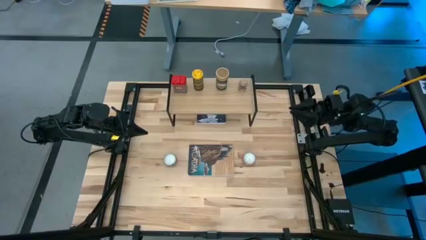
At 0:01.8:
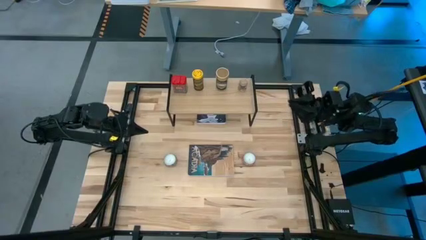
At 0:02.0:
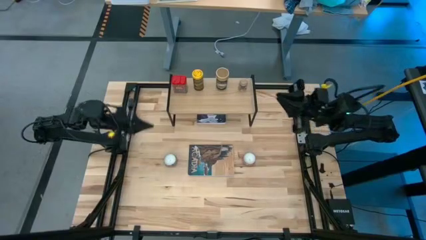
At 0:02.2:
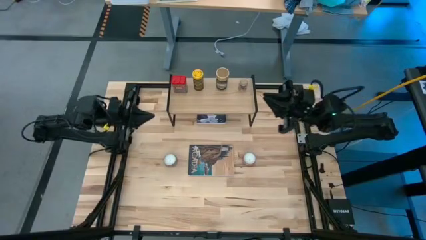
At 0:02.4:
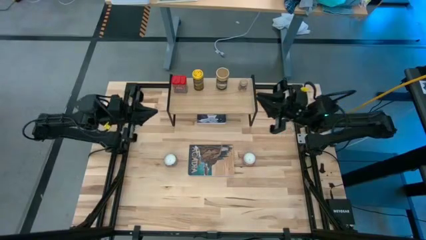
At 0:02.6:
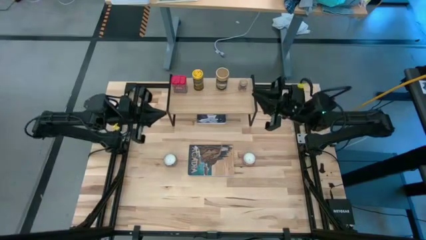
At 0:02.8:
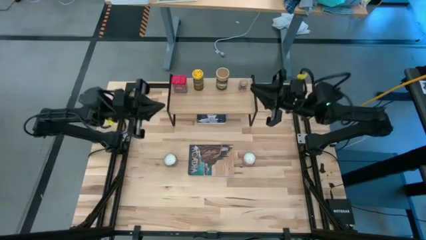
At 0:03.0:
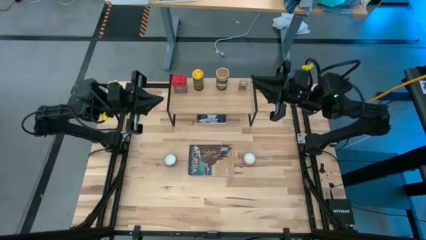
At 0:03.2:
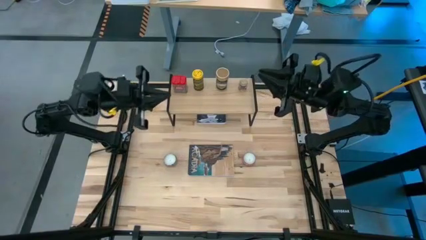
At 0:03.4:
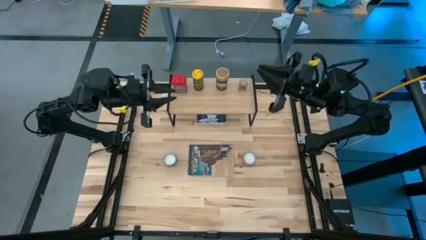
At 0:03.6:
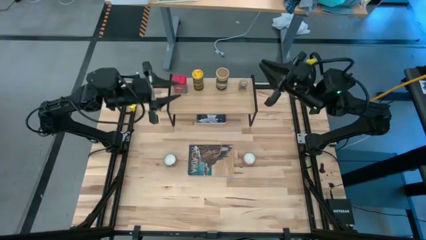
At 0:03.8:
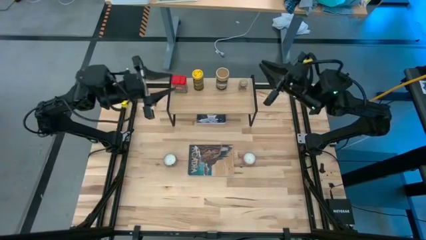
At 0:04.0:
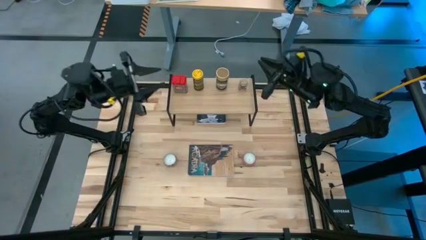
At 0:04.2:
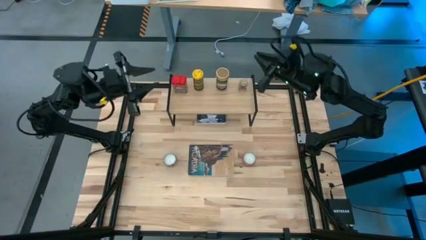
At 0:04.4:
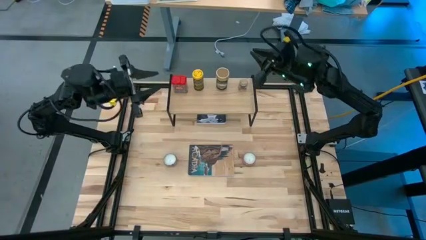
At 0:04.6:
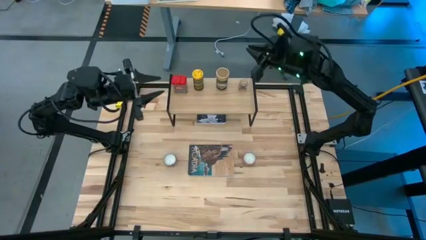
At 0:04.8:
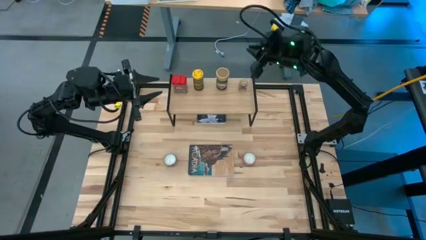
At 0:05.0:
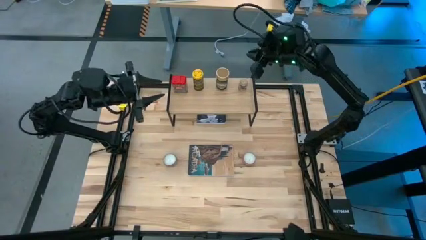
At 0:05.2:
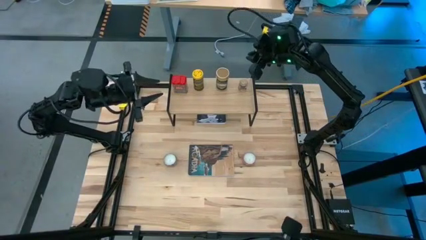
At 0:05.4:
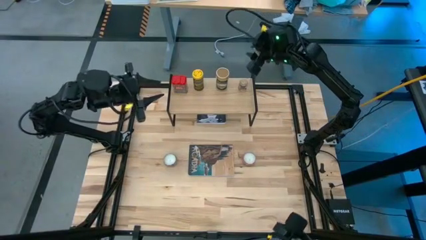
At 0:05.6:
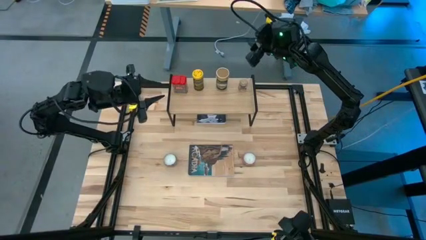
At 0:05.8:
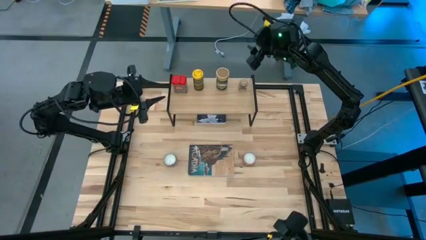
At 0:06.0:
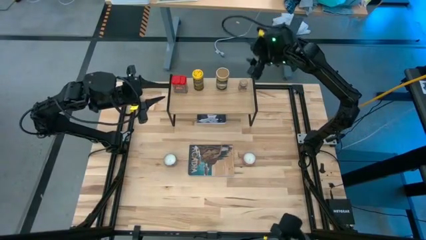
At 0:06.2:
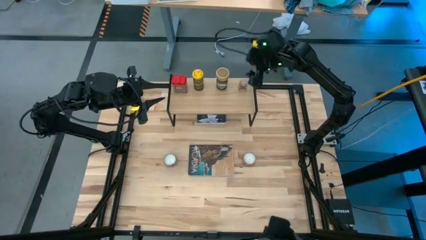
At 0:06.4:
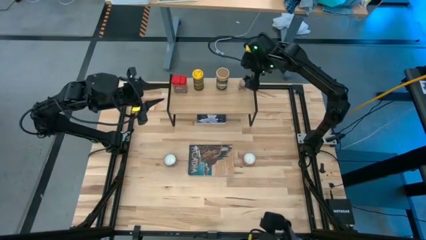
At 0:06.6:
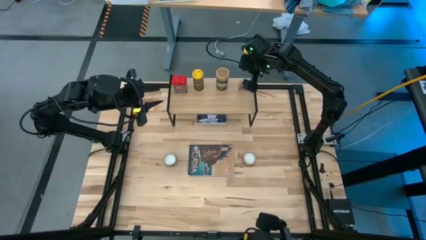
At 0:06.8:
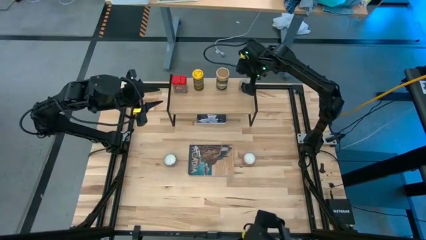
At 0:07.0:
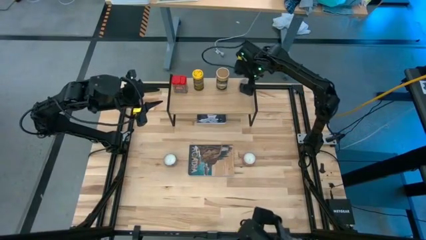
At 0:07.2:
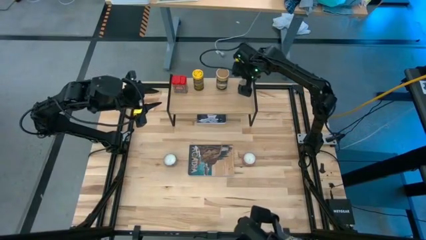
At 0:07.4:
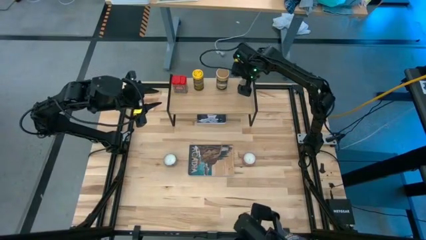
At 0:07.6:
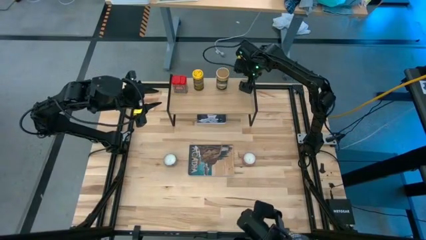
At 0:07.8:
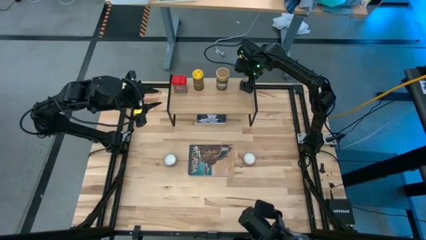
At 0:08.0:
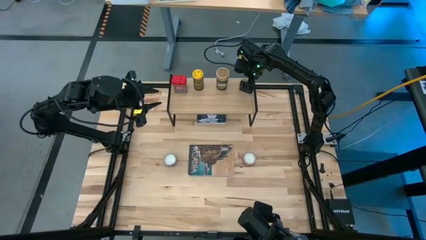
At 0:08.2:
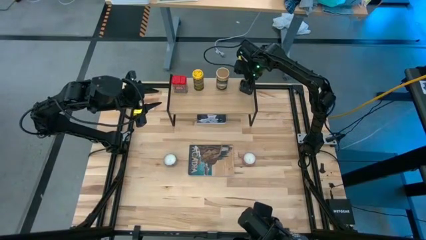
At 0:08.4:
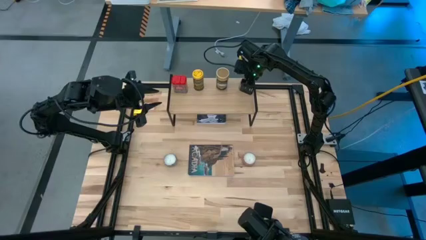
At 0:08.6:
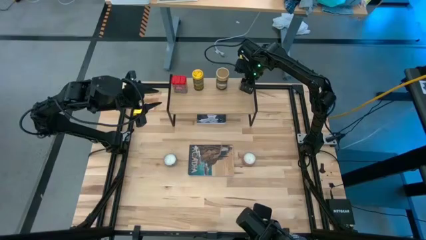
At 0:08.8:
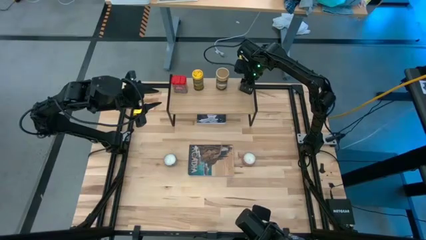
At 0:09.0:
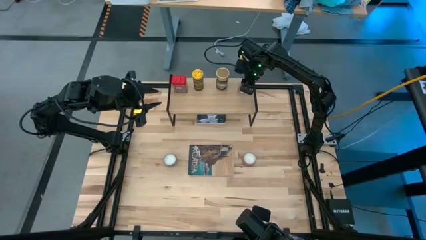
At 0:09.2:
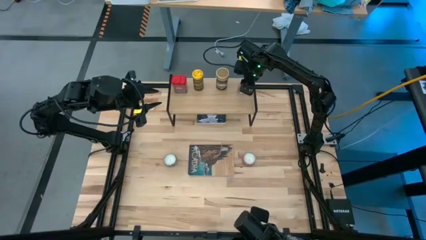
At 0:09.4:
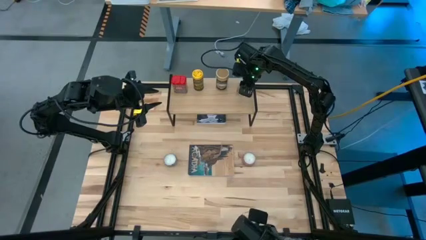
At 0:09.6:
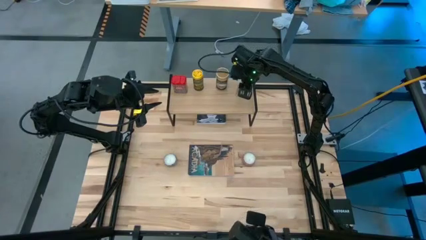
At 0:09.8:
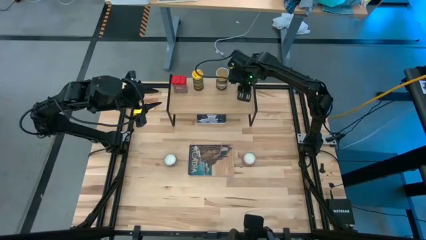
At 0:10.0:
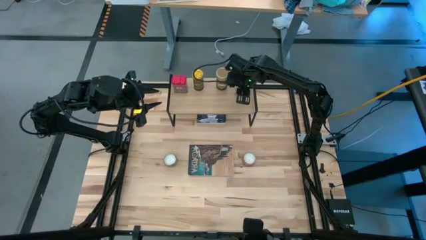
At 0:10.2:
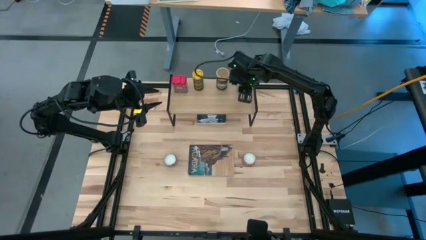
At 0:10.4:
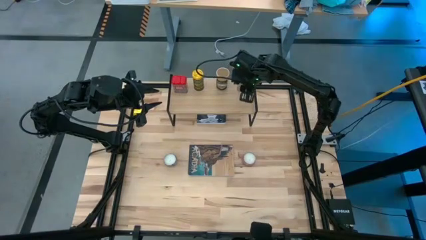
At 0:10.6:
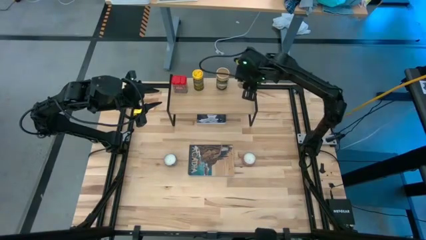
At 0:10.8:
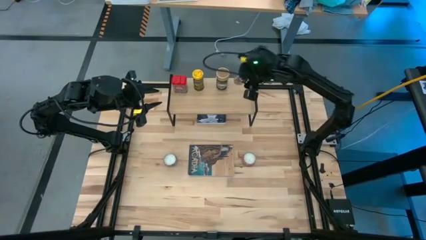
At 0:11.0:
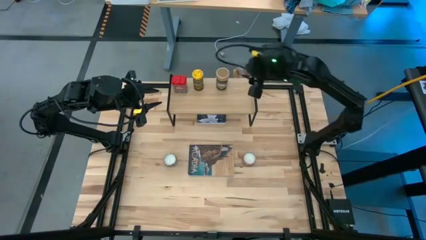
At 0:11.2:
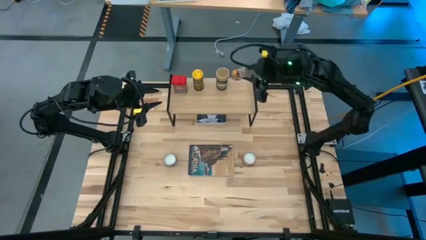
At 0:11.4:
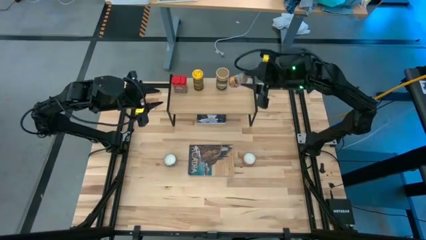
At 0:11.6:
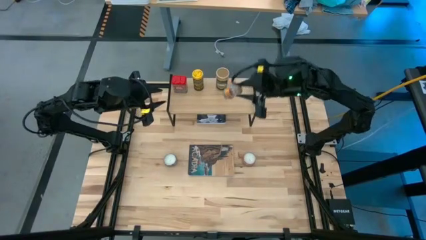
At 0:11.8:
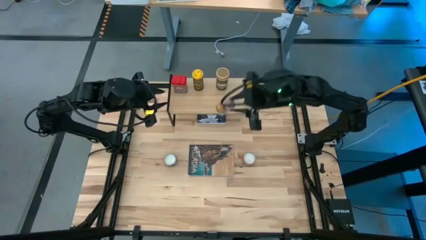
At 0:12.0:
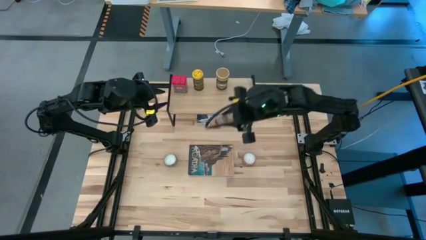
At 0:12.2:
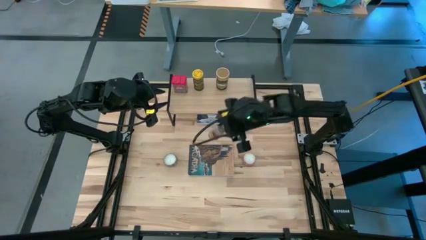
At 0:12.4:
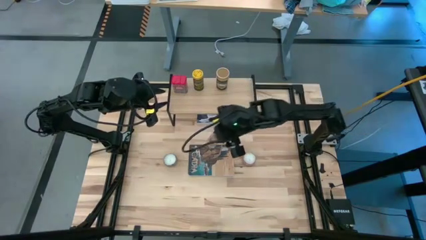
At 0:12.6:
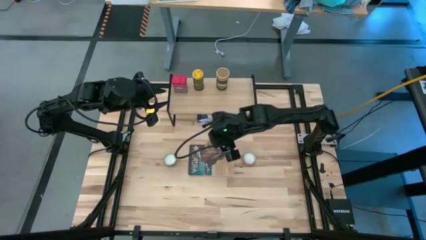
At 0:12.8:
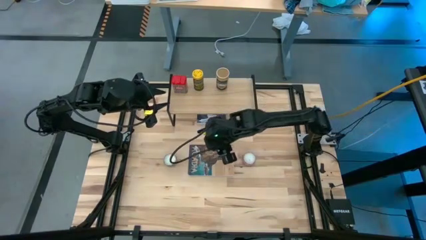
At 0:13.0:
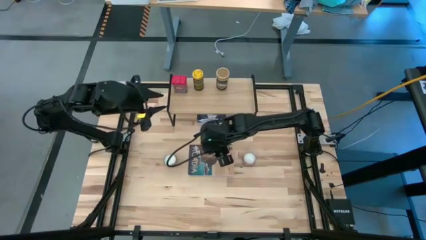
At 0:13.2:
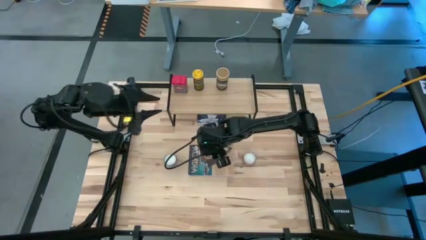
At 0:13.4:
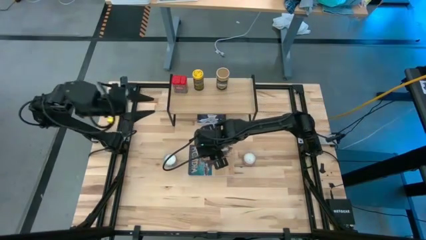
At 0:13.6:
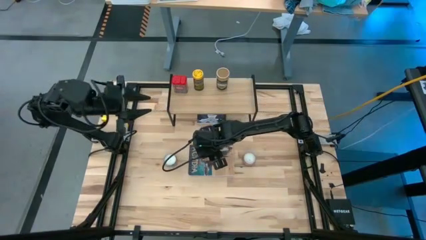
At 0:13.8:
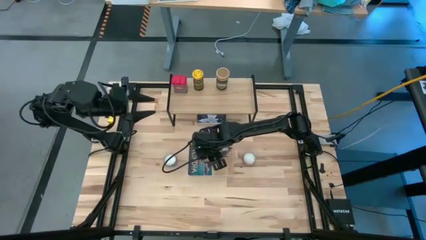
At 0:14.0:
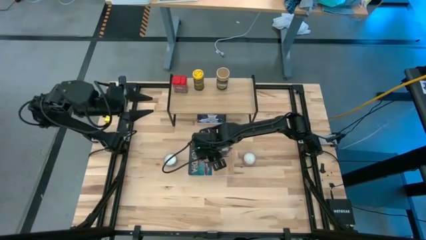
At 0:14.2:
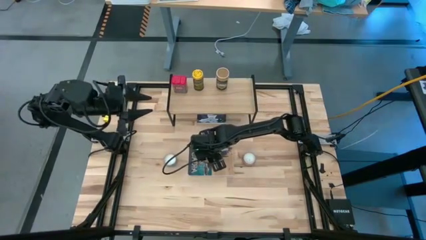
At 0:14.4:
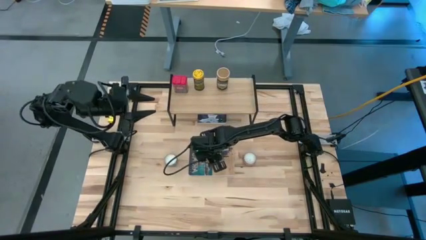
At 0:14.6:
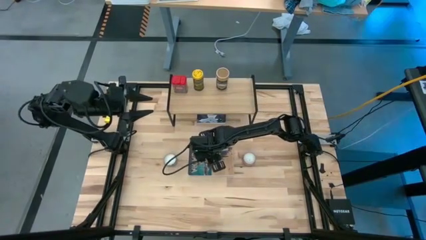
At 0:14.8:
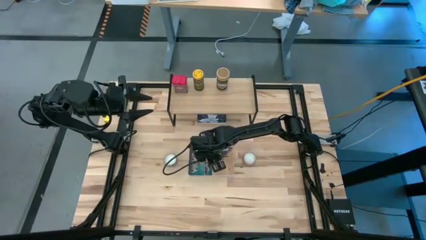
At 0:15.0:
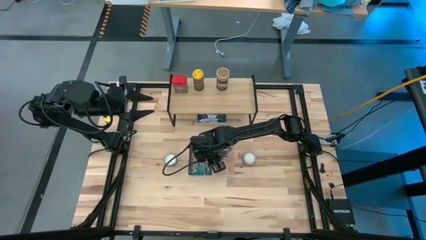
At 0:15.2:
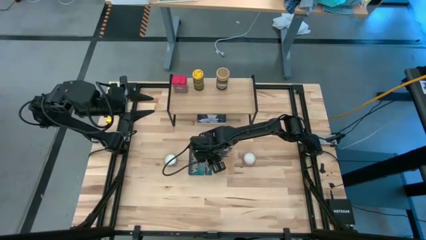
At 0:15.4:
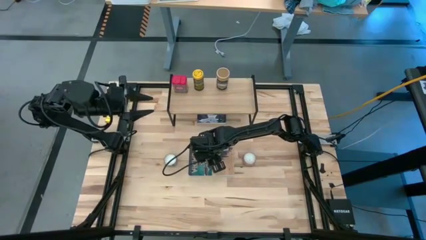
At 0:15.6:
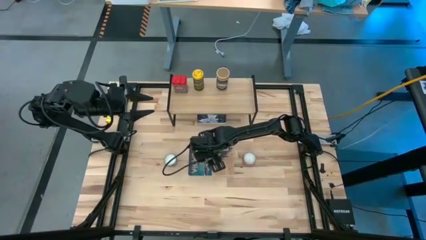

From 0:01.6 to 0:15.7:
Task: Shelf spices
Remove the transparent seasoning bottle from the shelf
